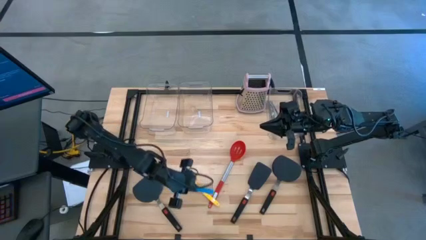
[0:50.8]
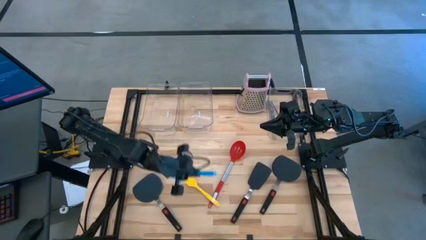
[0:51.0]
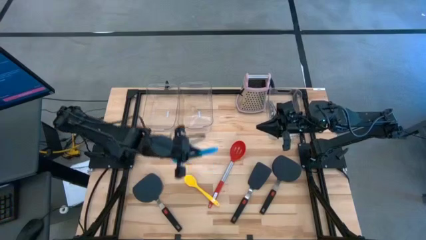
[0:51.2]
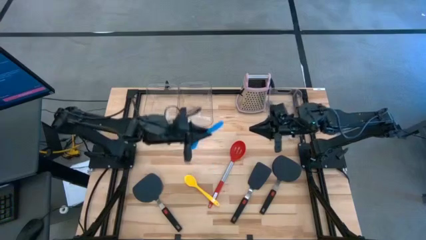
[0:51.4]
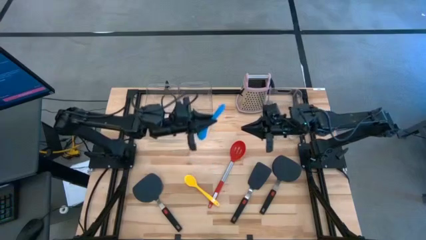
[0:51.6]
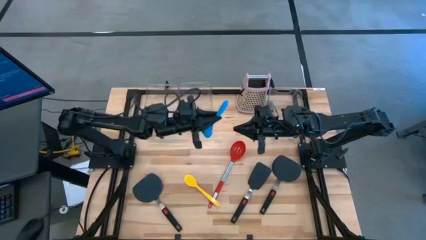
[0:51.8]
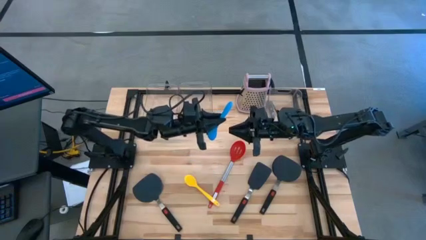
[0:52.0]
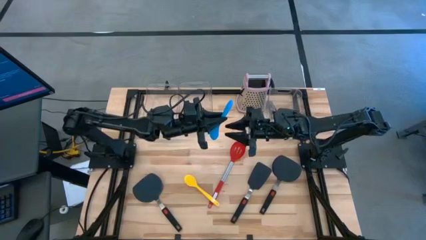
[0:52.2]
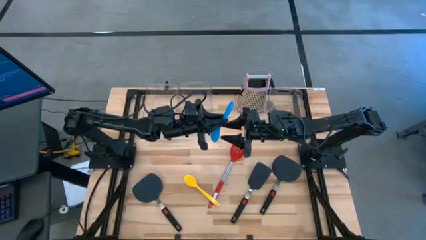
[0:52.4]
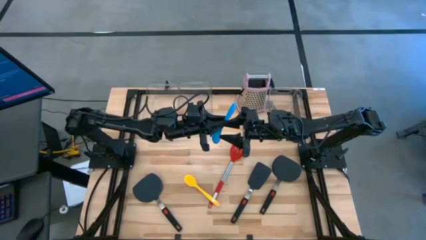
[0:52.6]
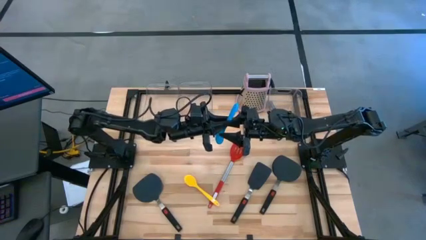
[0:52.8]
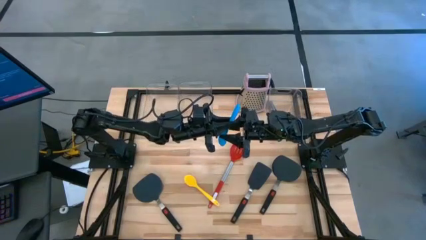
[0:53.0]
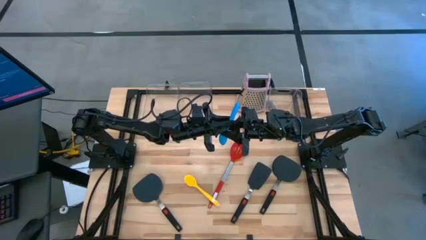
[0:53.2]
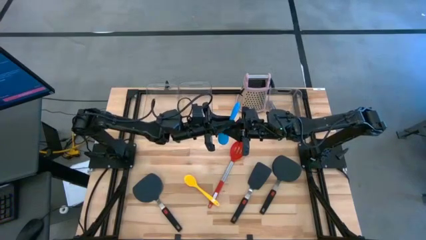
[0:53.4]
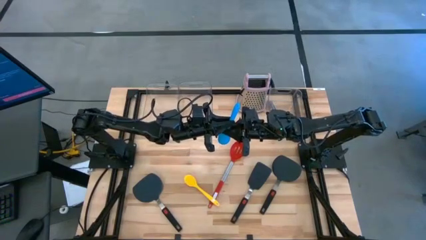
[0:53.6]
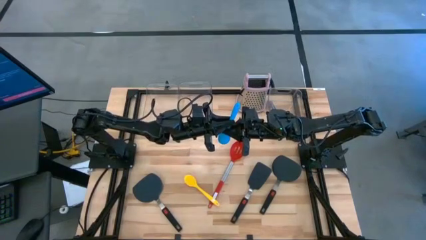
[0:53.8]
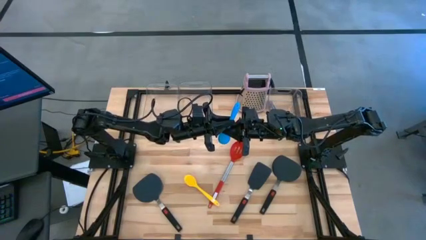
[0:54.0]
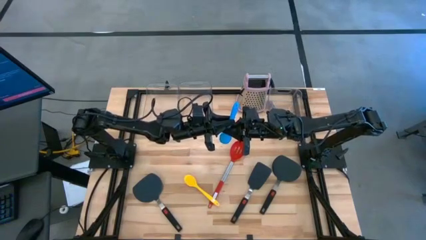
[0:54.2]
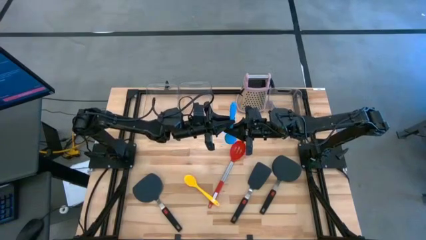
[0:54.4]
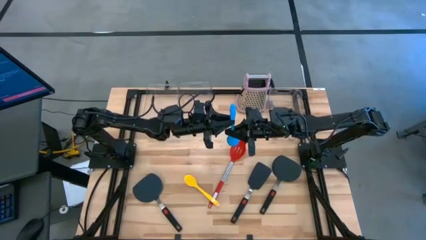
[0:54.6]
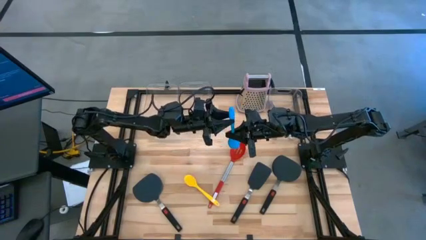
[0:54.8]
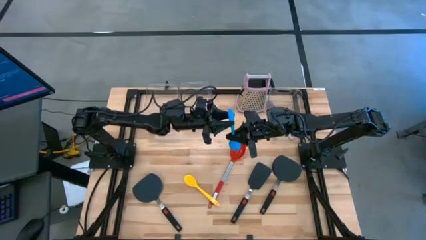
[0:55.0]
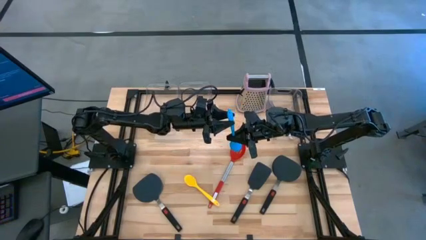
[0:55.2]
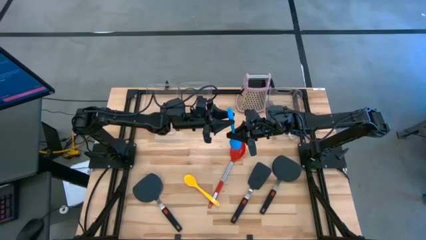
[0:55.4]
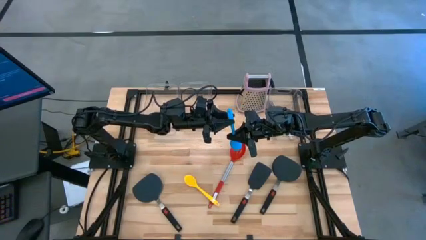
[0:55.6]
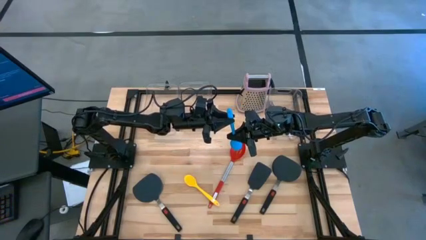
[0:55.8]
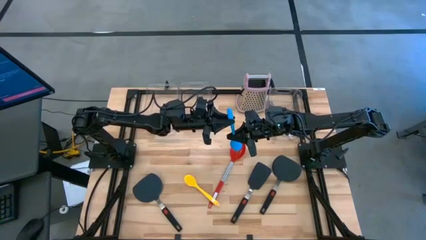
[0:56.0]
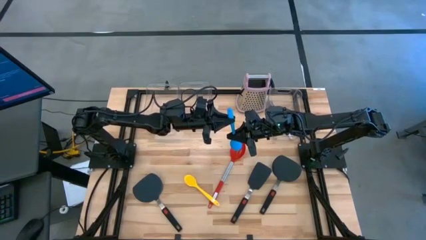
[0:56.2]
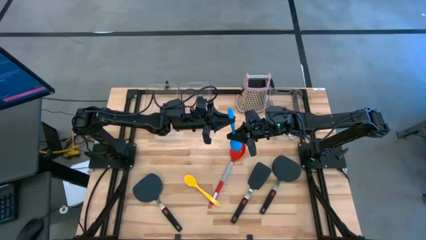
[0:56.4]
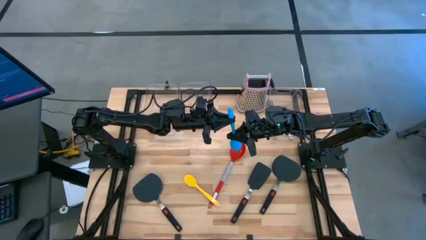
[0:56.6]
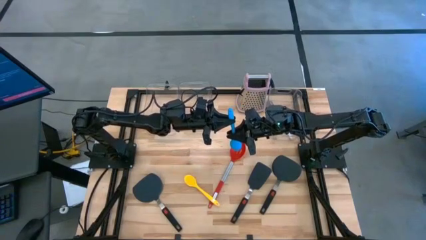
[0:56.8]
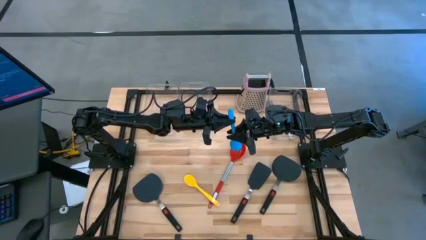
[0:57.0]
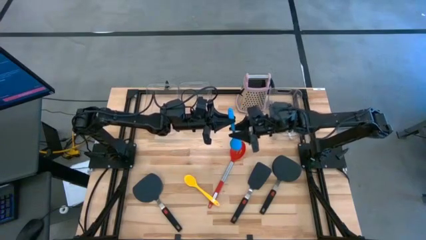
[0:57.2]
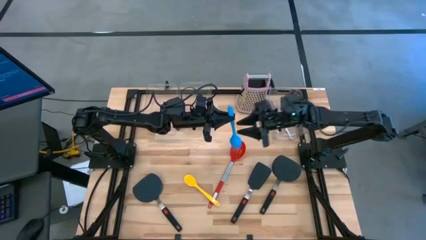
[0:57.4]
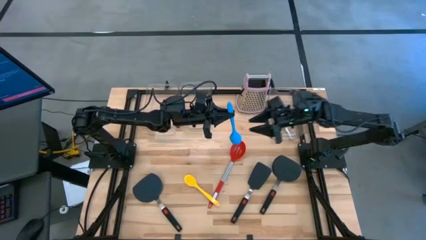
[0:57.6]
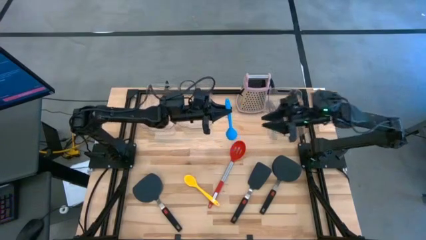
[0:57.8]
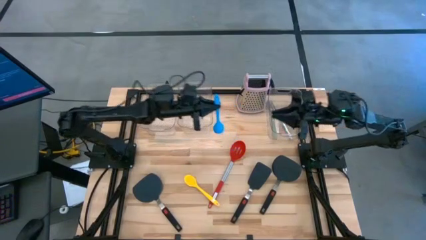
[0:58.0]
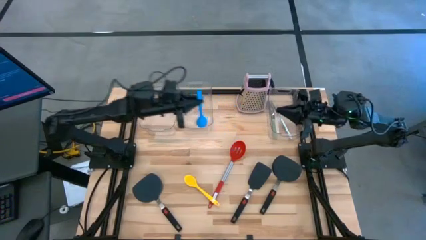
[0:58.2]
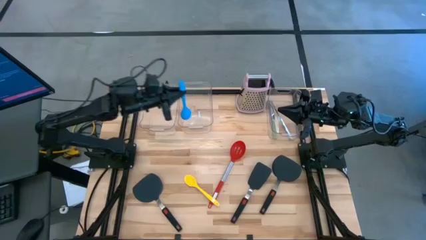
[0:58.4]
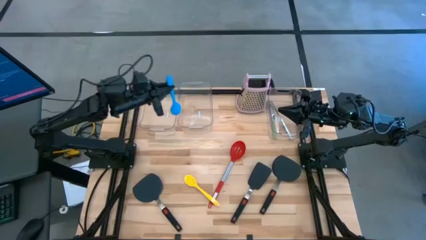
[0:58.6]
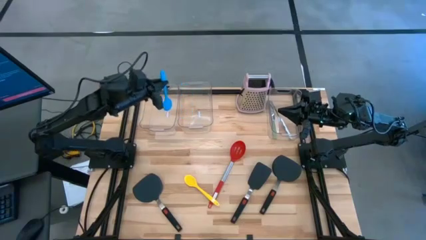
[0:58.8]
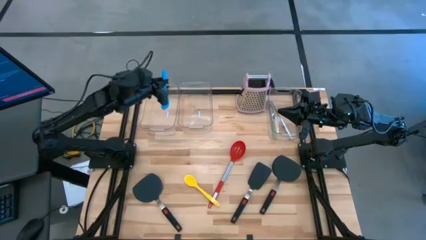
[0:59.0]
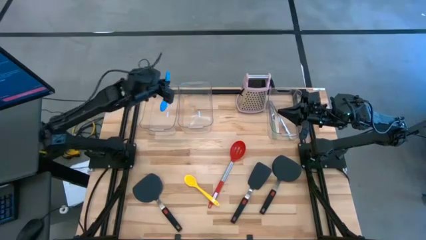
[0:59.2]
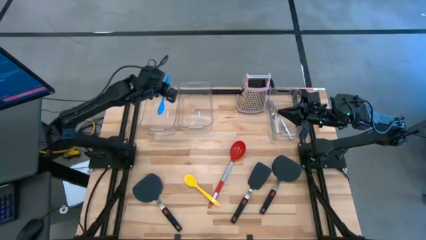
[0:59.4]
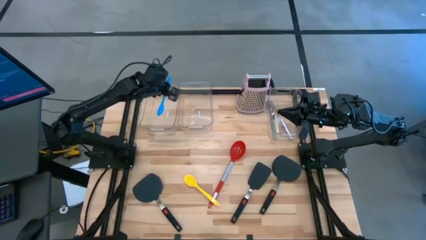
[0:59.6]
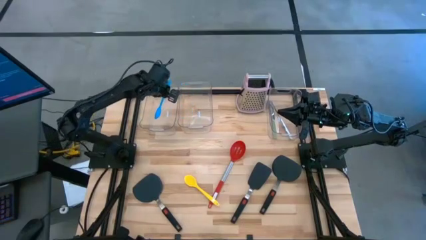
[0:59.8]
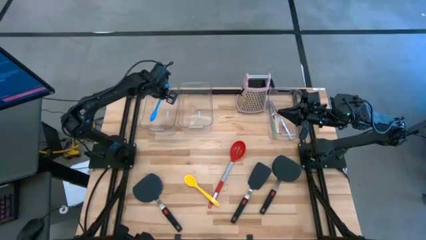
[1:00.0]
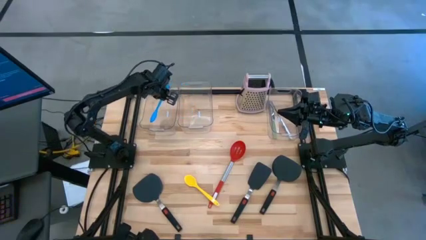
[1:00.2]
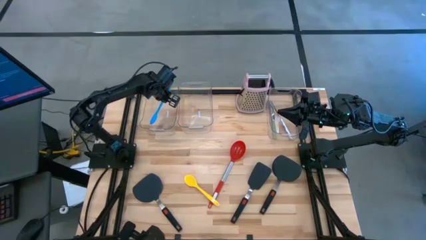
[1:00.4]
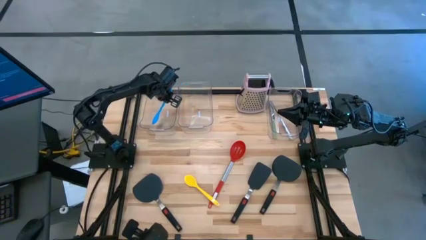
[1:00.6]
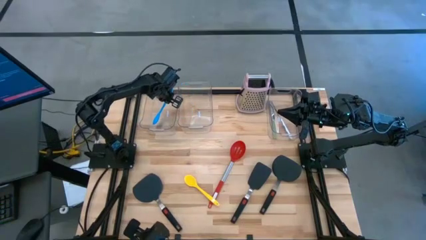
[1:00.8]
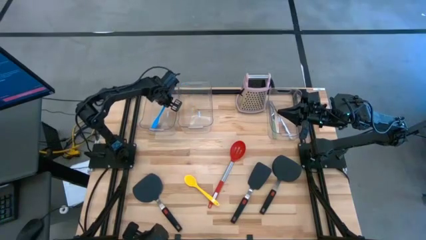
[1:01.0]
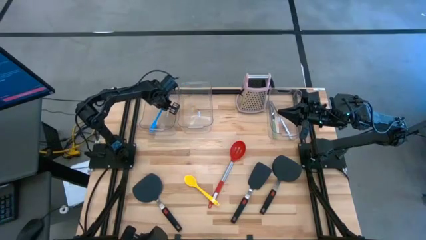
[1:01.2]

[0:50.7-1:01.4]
Task: Pick & Place Kitchen Items
Put the blue serving spoon into the left transparent bin

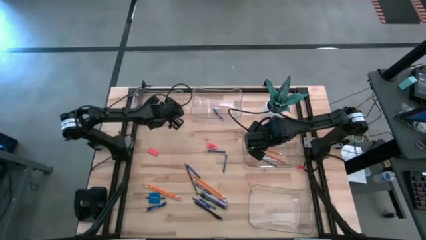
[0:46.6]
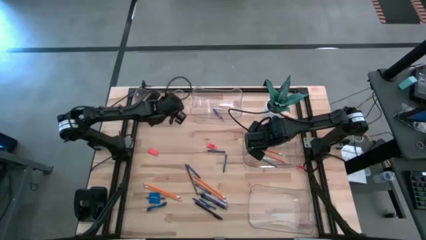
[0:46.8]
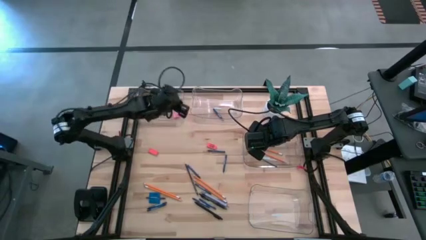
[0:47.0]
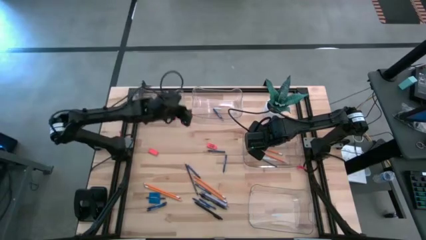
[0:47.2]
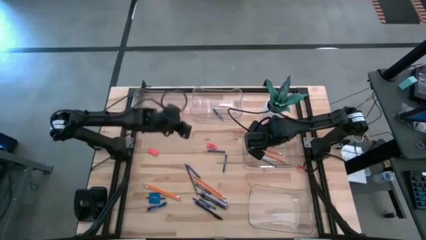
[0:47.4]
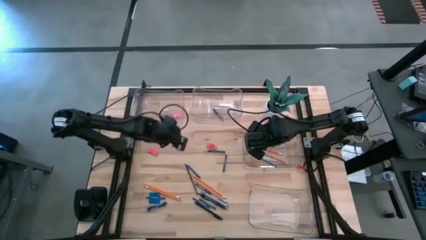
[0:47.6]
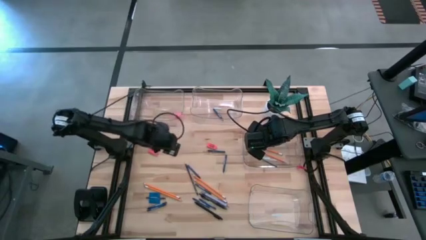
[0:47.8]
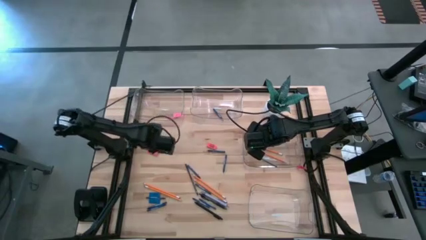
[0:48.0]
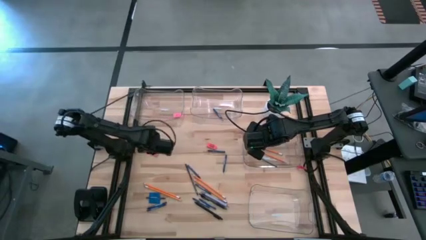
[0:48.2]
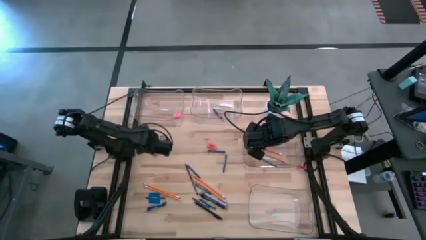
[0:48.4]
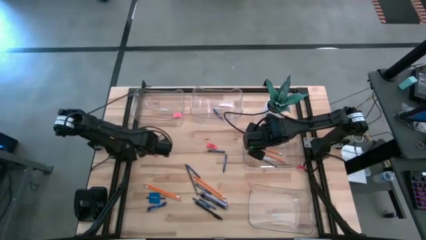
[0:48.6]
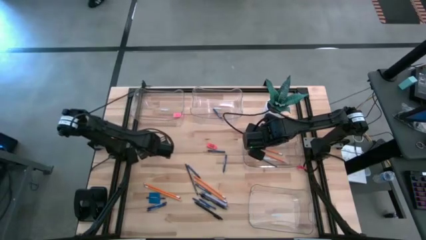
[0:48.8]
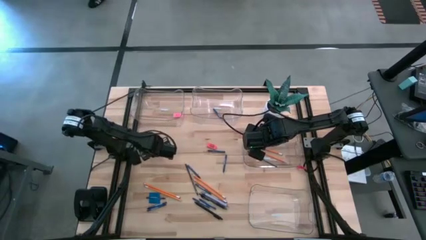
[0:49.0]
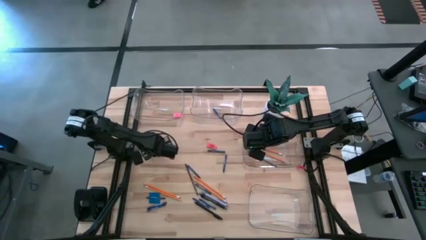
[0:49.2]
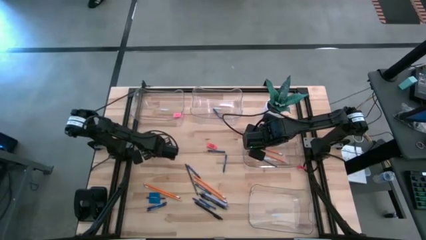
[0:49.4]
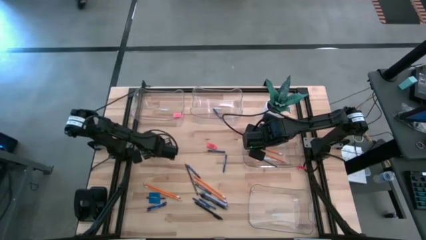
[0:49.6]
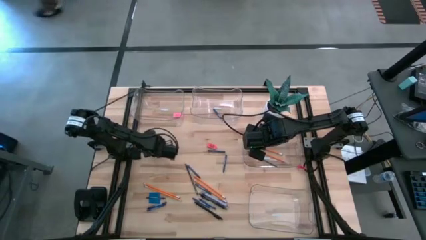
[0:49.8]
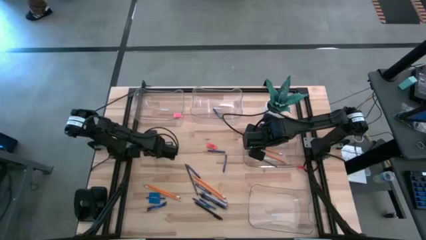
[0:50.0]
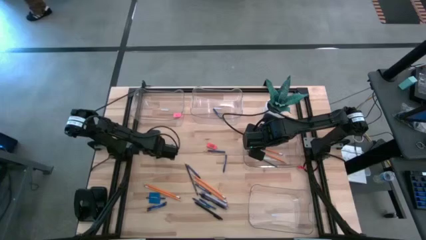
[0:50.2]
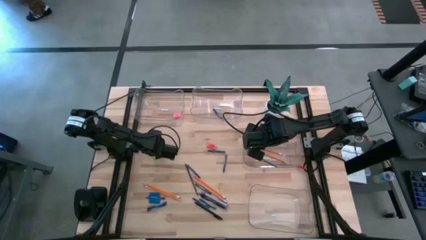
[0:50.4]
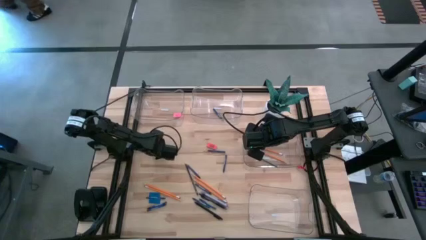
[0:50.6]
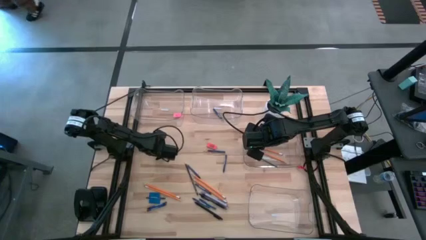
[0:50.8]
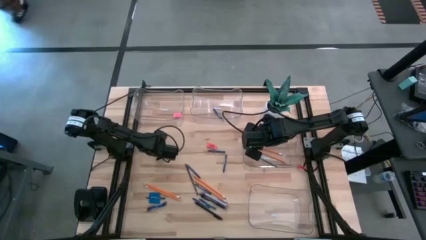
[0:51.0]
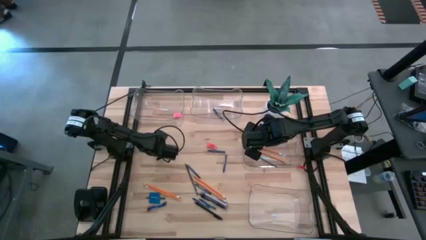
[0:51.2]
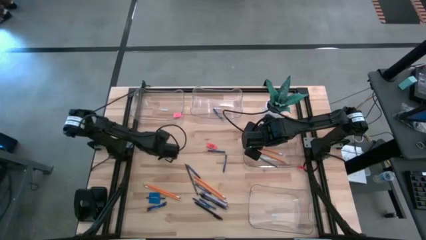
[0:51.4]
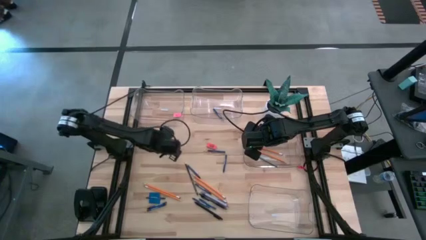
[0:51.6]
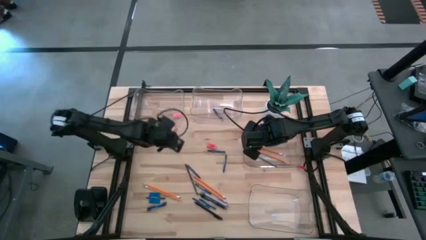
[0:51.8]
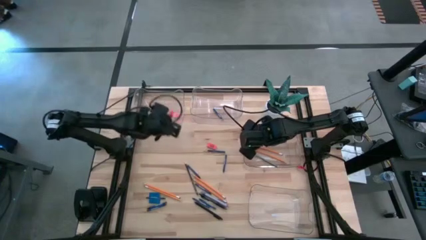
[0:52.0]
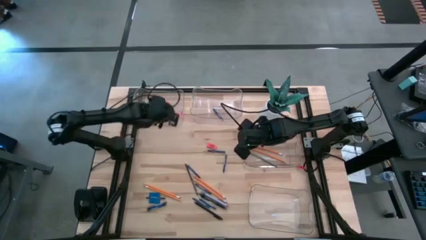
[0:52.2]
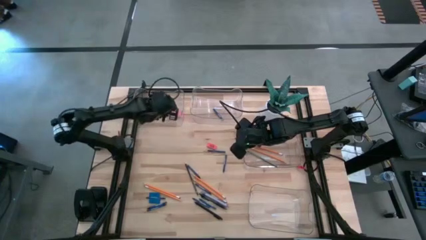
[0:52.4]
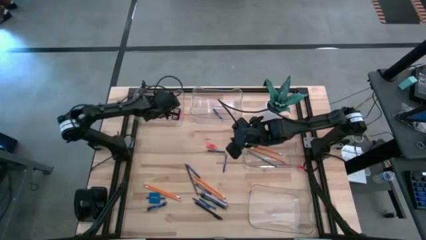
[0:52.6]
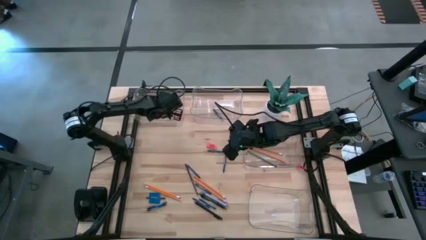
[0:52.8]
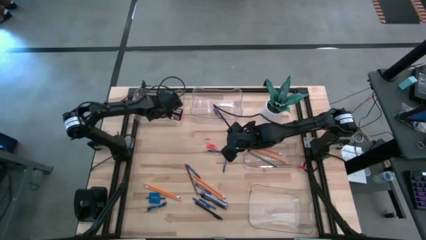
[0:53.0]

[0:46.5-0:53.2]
Task: Sort crayons/erasers/pens/pencils in bins
Put the orange eraser into the top left transparent bin
